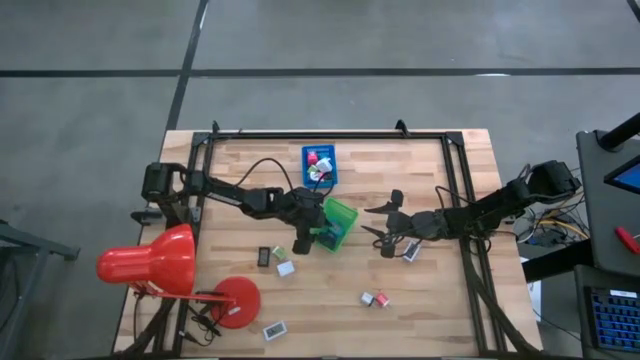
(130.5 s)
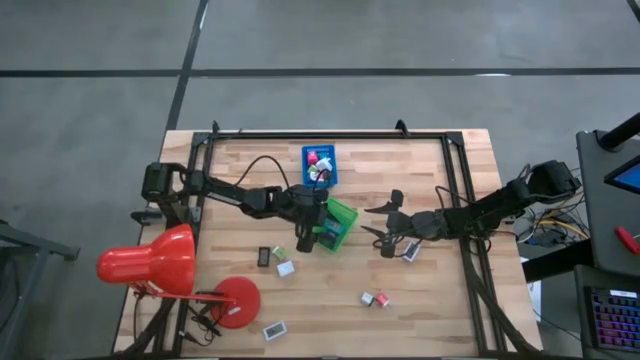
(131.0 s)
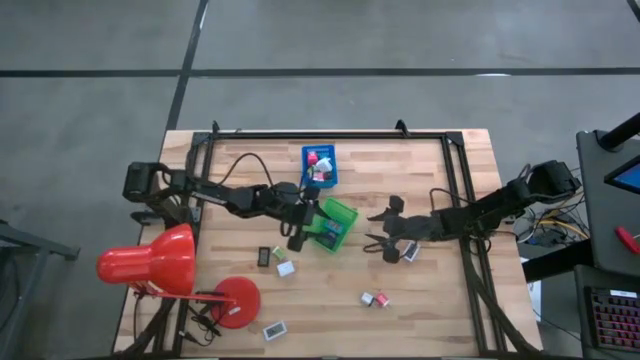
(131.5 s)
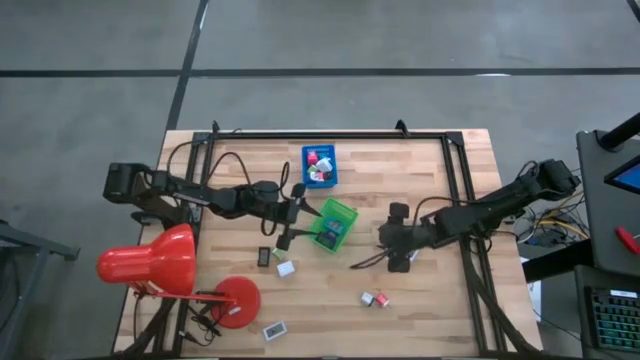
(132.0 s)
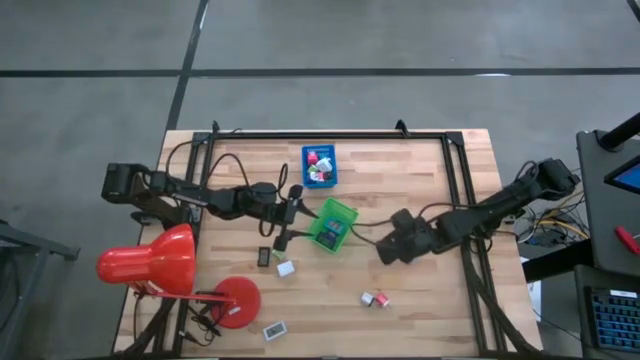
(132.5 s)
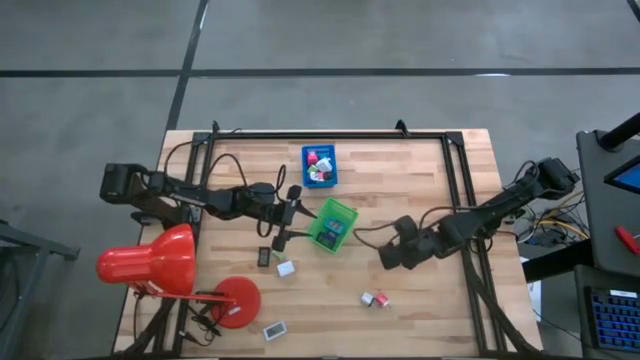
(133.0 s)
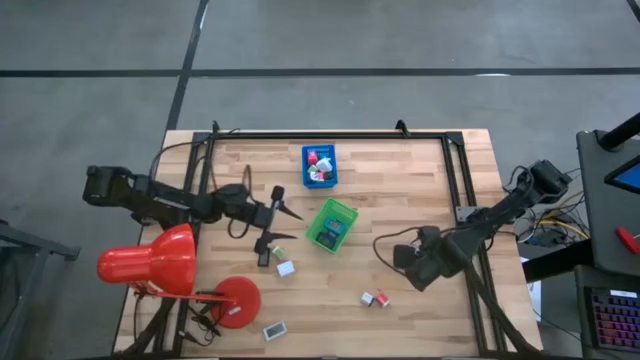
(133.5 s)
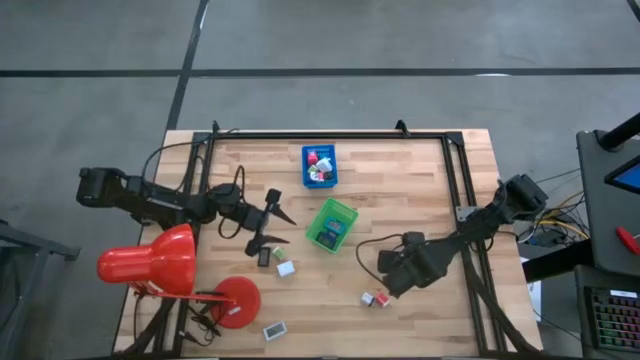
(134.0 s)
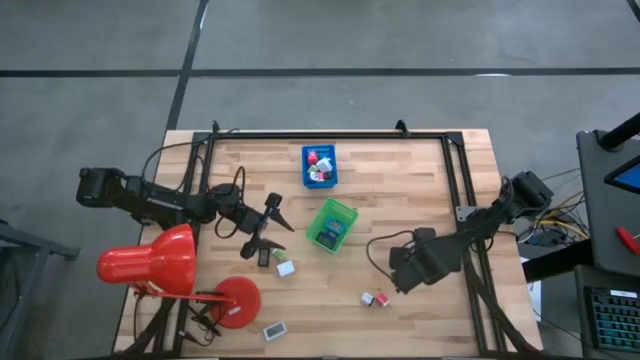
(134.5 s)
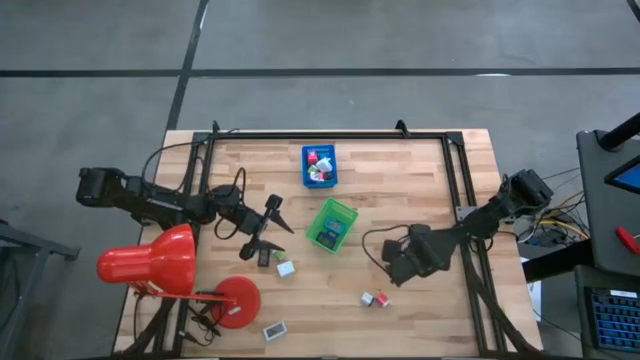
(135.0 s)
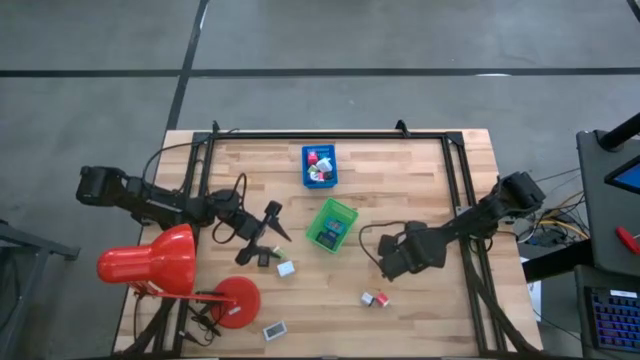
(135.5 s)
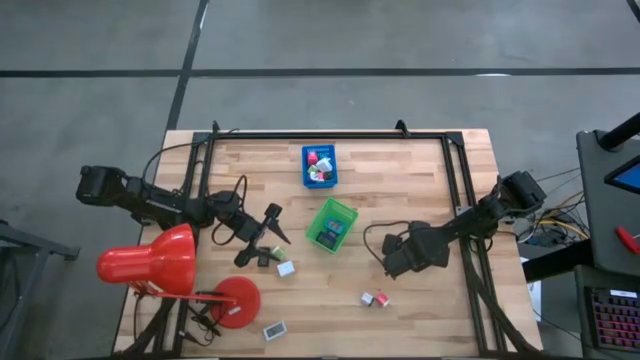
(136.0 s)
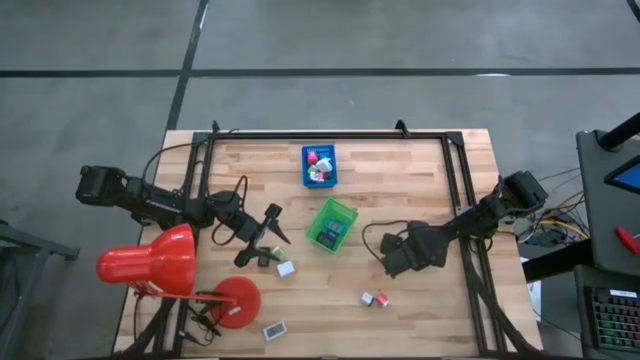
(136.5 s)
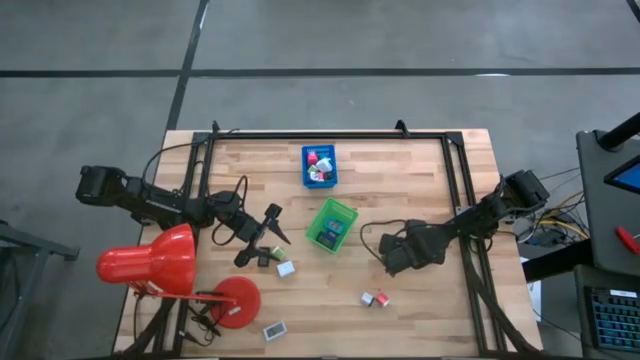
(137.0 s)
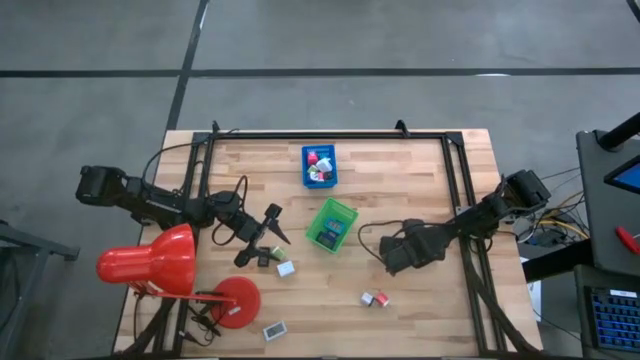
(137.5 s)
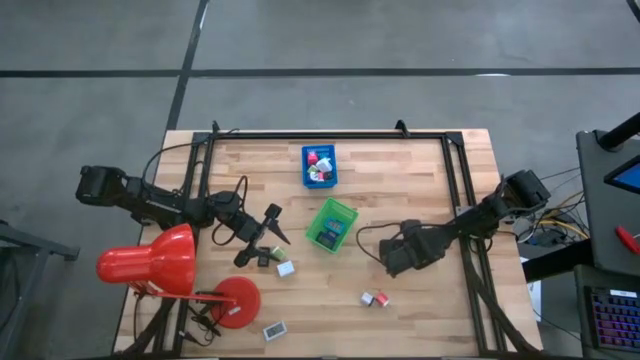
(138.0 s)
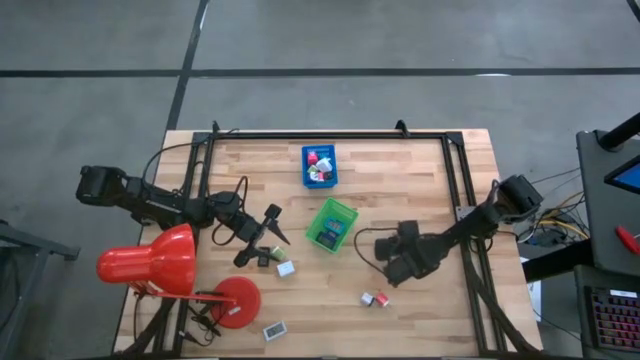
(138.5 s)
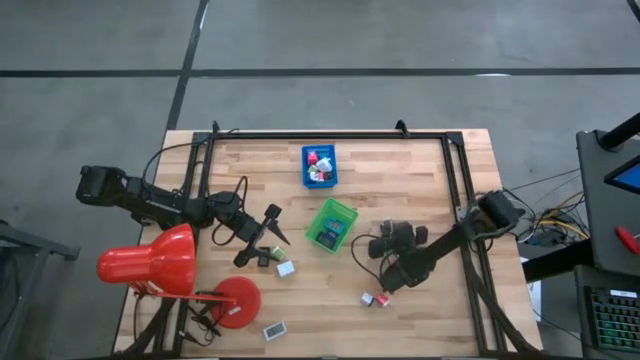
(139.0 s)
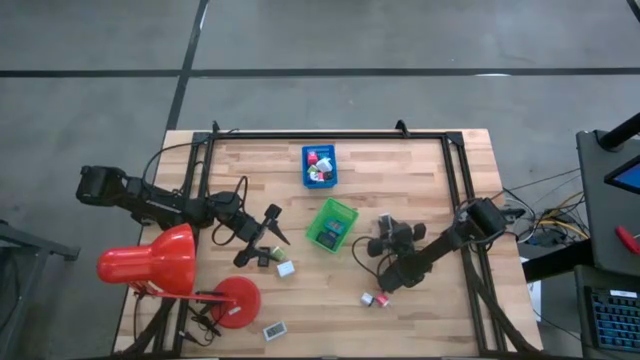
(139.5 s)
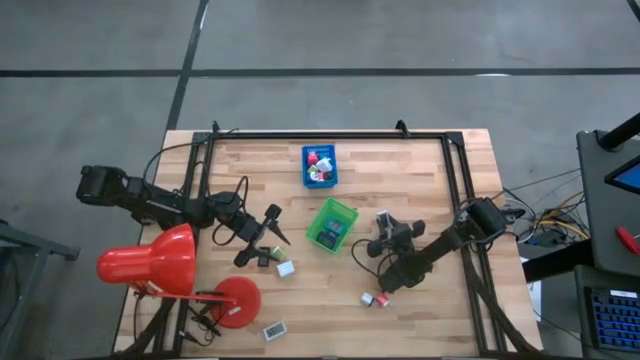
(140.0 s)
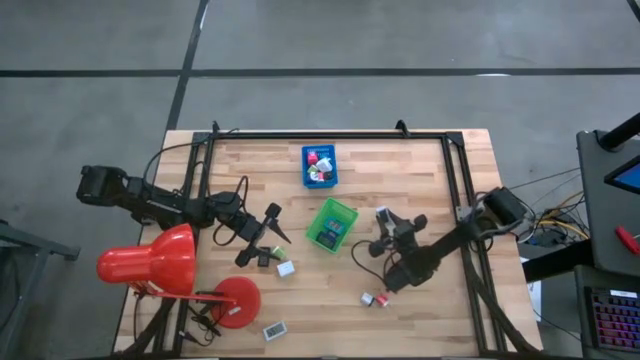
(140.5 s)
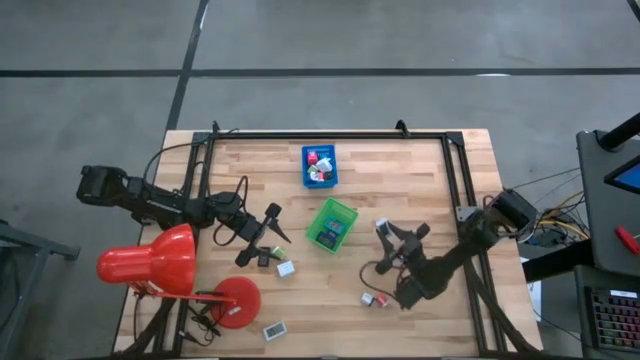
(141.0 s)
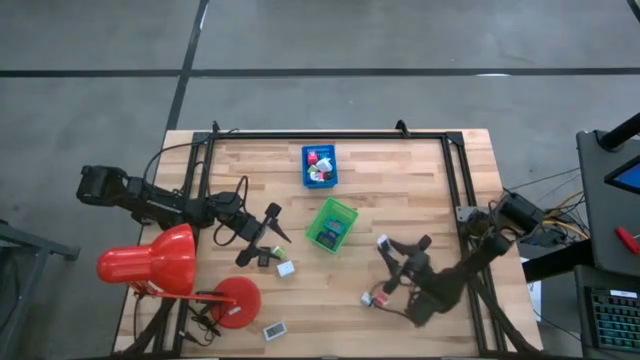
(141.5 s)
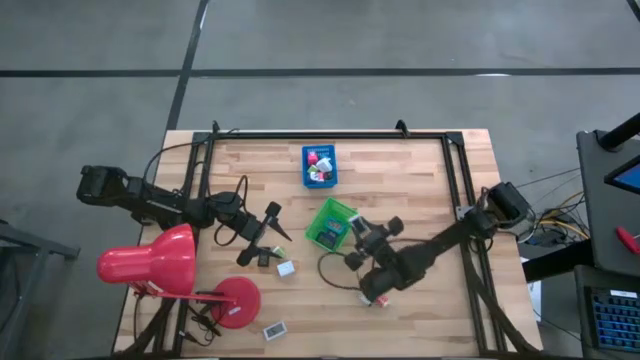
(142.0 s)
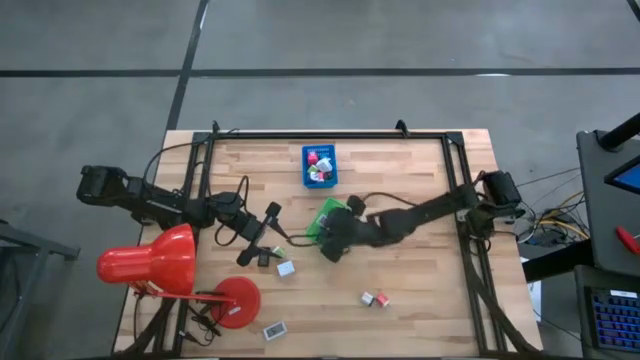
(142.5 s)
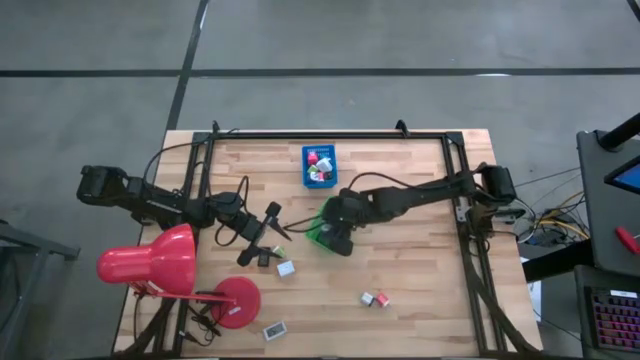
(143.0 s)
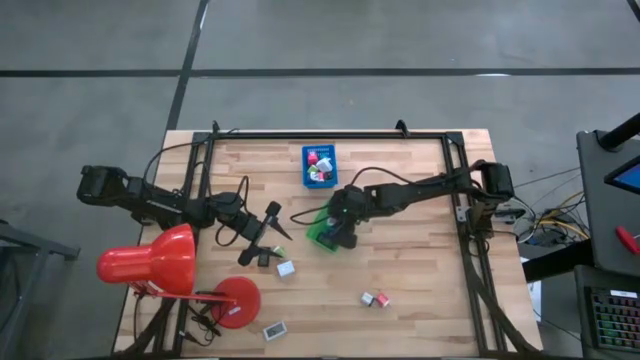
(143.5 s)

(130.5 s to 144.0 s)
Task: Pick & Place Office items
Put the top white digital clock into the green bin

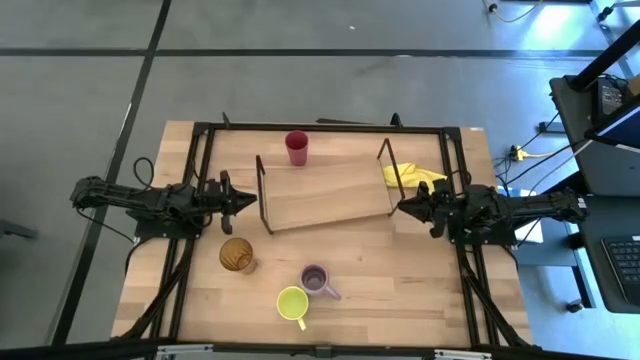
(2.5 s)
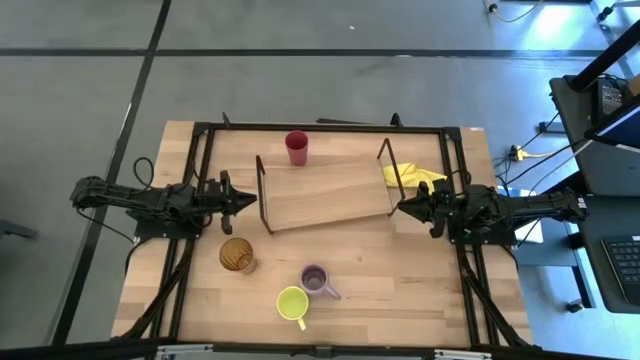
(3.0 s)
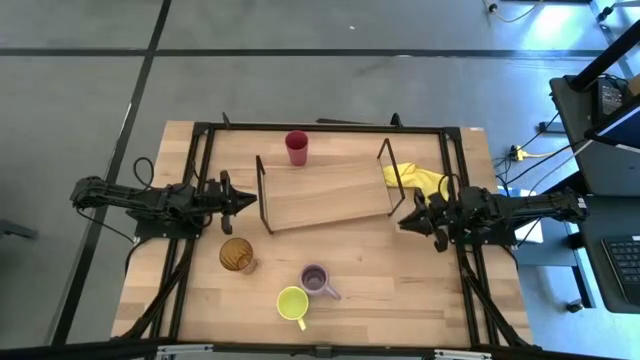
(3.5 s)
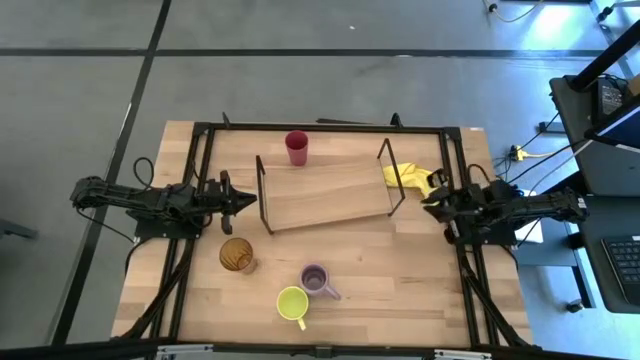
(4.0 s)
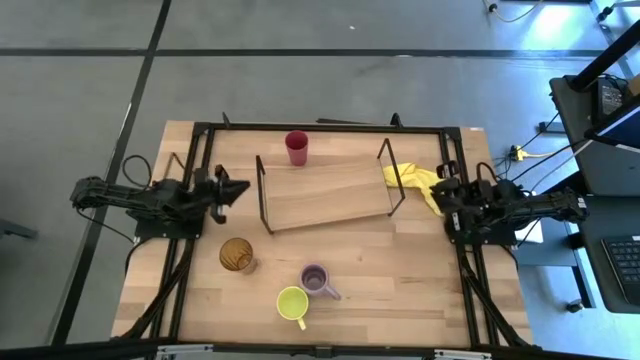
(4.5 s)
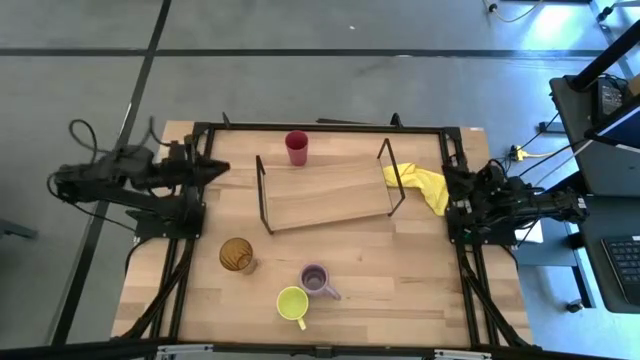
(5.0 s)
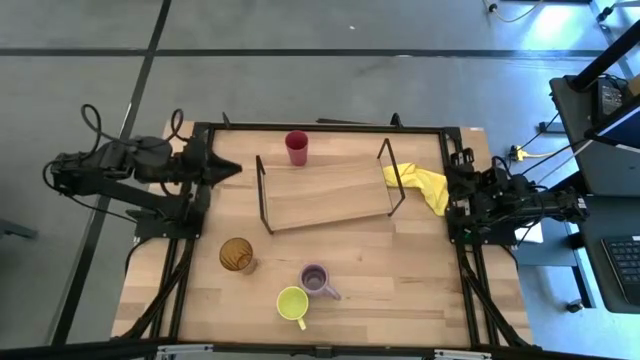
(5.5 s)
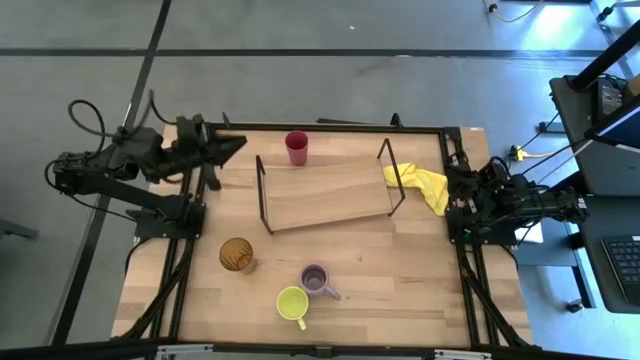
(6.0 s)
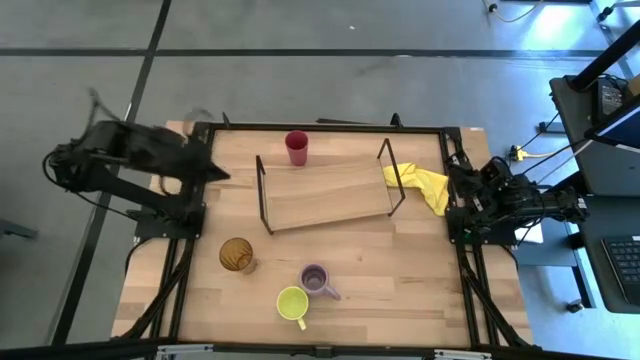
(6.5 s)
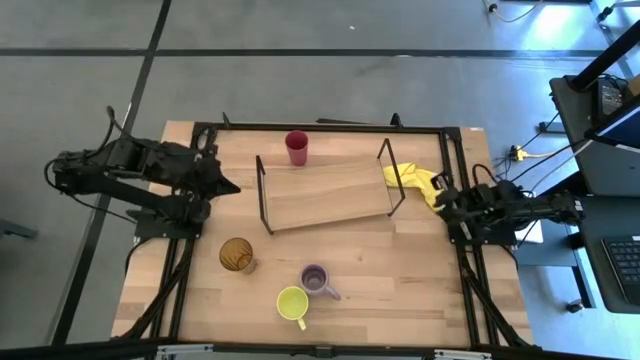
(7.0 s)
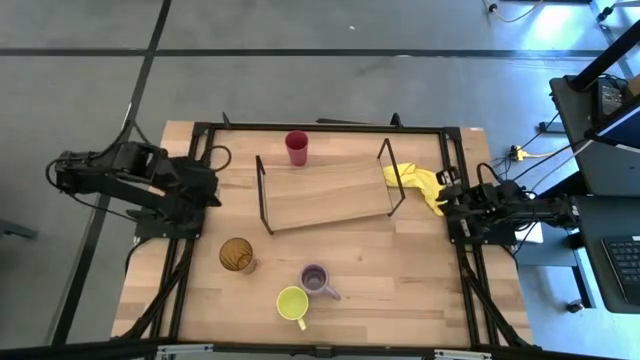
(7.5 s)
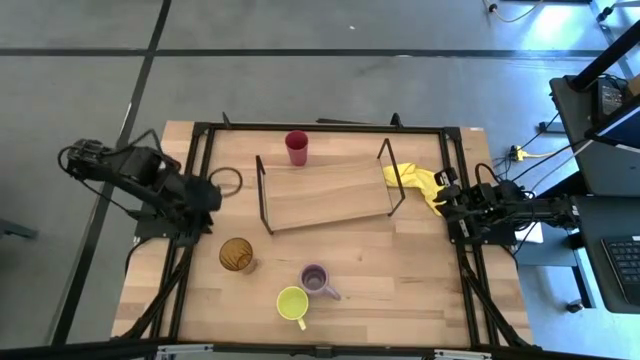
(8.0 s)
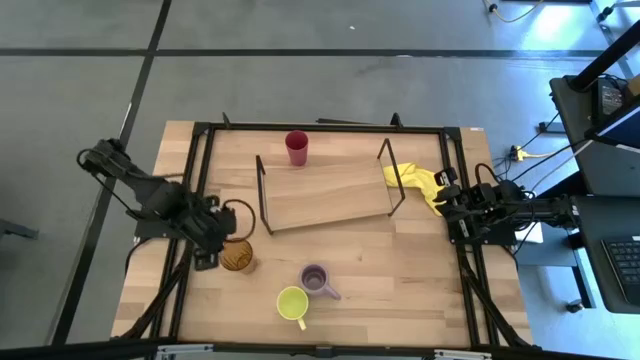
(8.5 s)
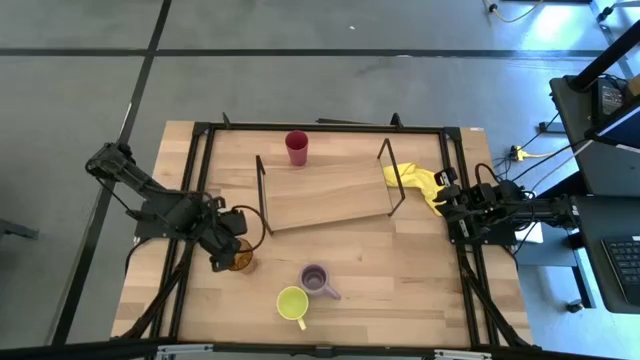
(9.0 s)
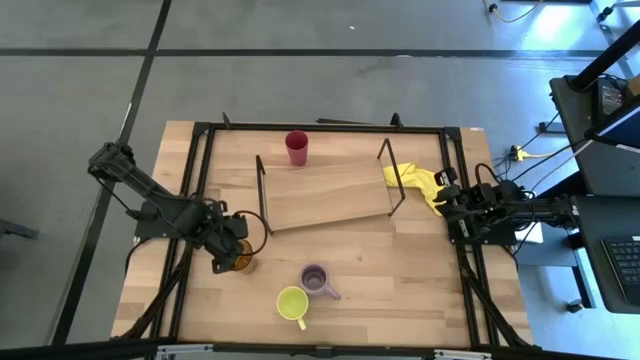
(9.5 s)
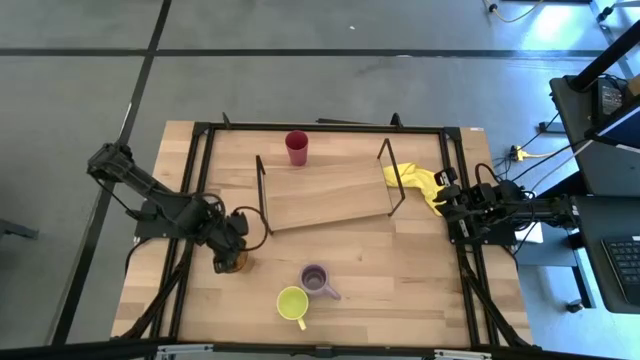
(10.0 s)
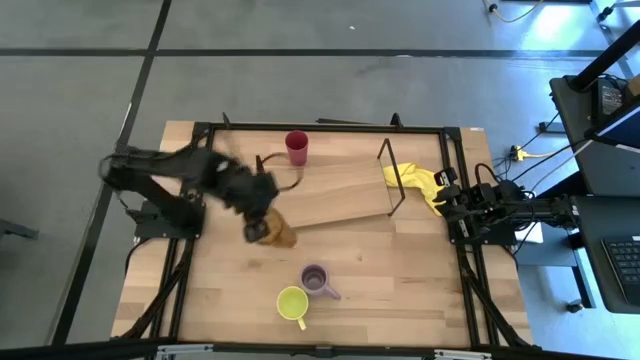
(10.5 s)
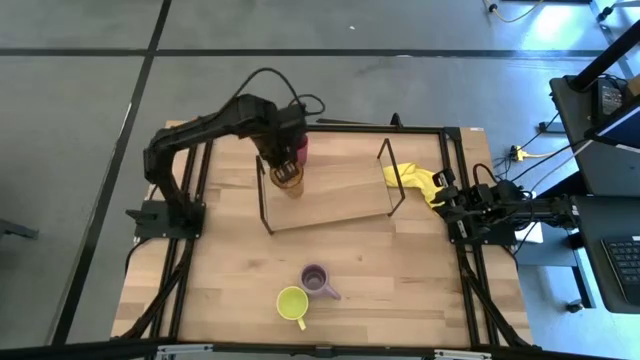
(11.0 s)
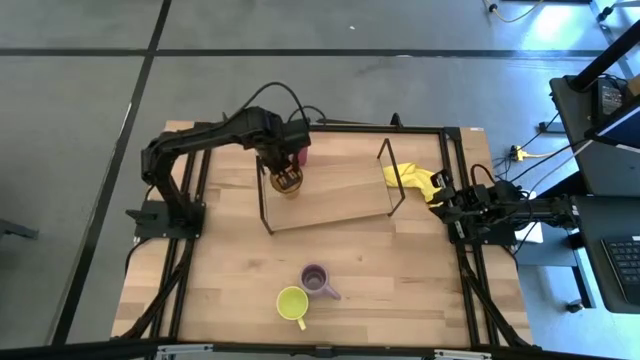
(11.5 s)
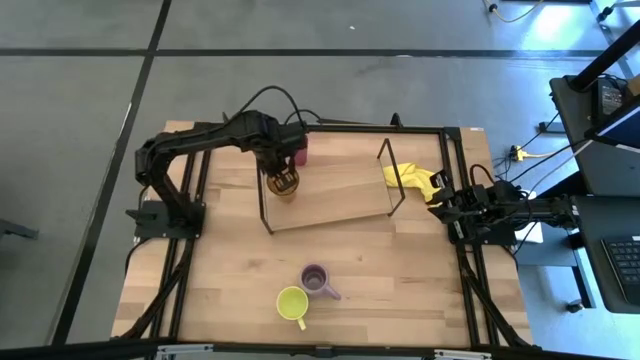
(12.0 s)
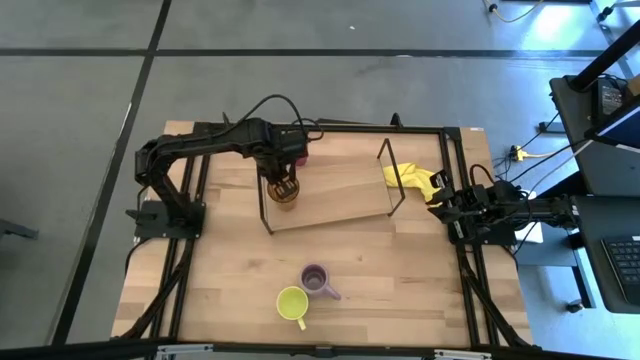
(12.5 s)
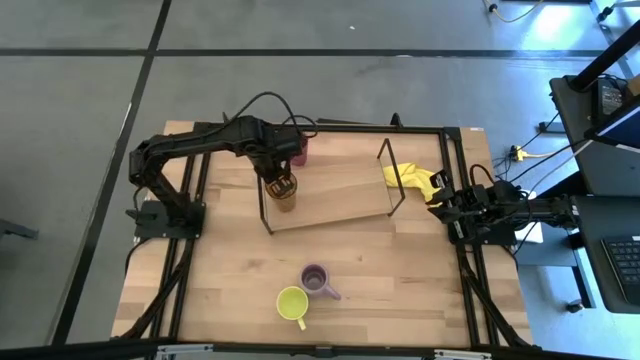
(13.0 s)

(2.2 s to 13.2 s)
Task: Stack small to large cups/mugs on shelf
Put the orange cup on the shelf
